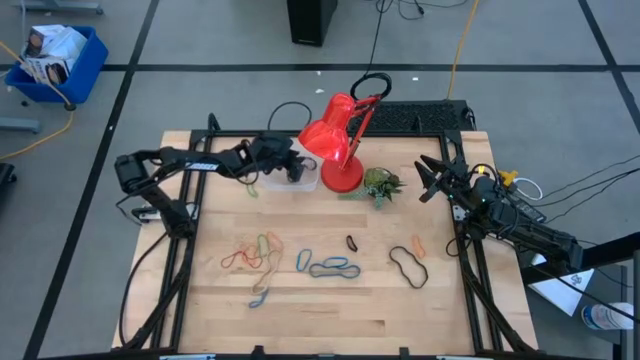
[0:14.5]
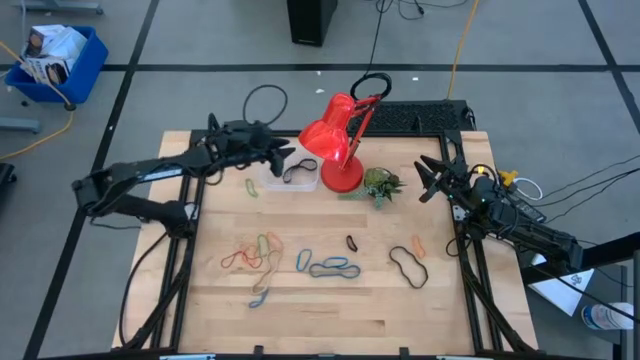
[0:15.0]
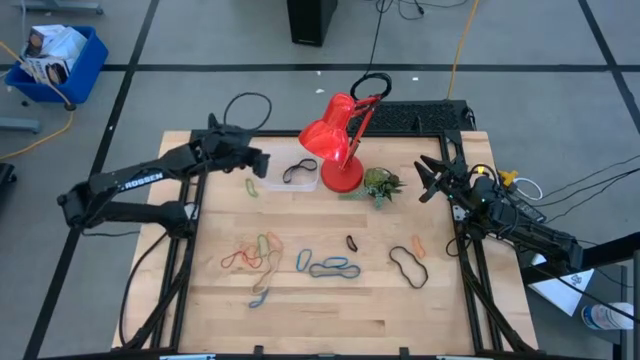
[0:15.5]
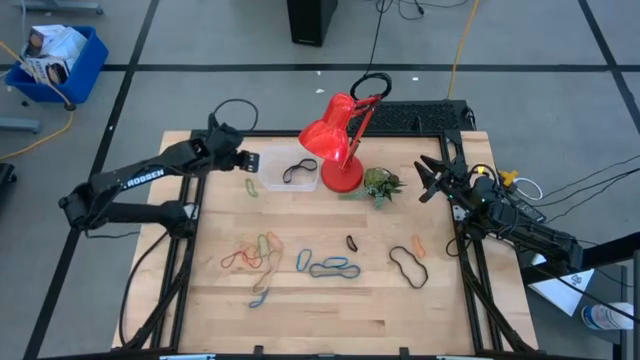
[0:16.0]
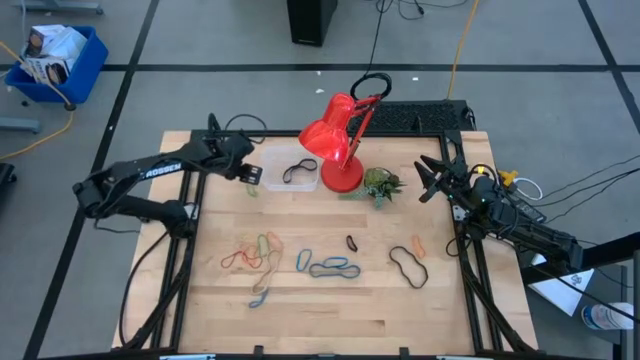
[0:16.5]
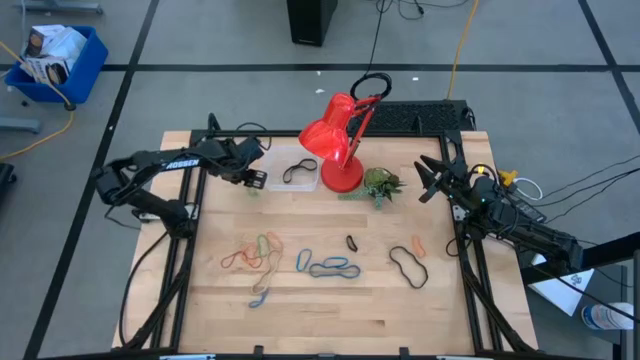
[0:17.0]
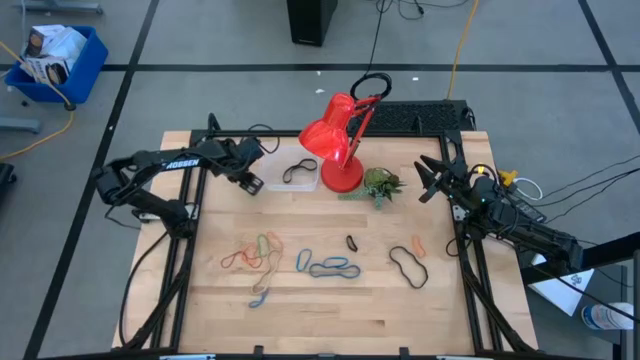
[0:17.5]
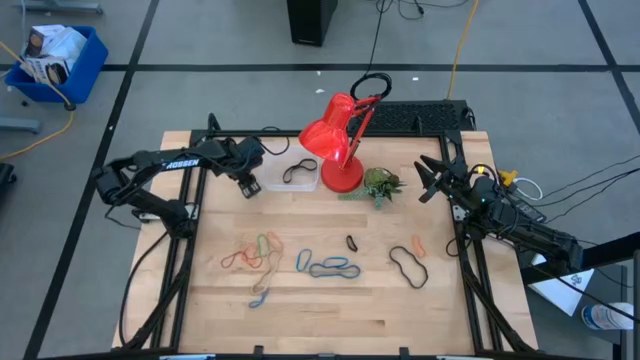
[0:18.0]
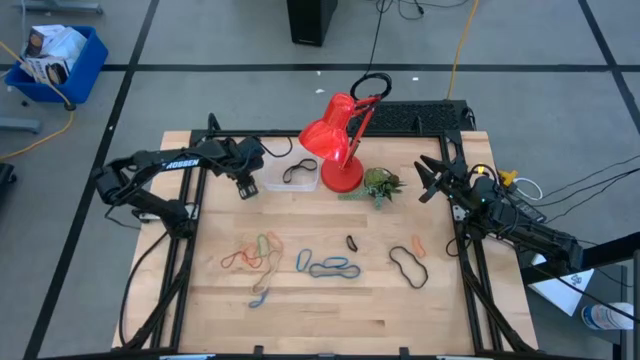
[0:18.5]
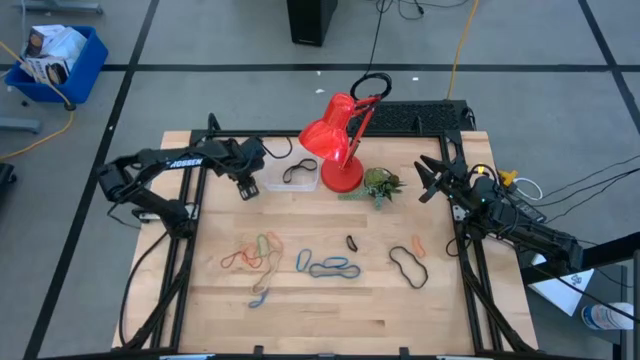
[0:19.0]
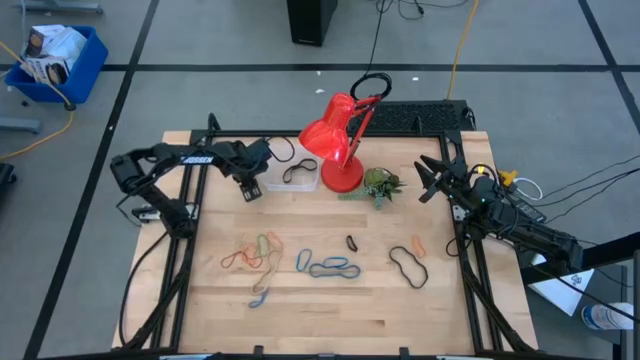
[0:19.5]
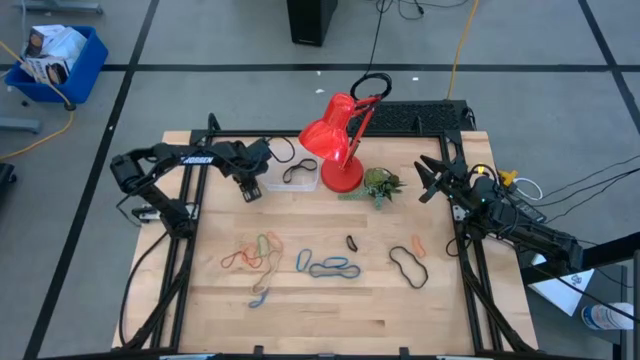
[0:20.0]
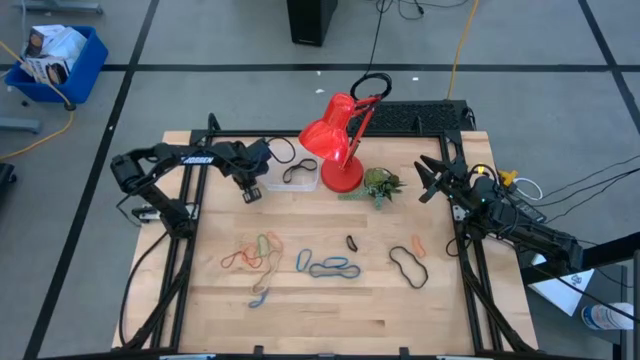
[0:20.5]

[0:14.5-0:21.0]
Task: Pick and place rubber bands into bin
Put the top green rubber band into the transparent bin

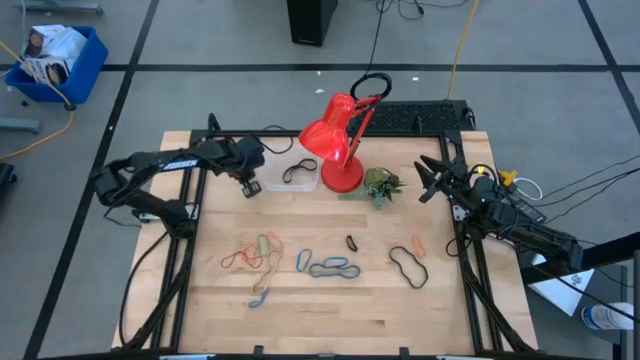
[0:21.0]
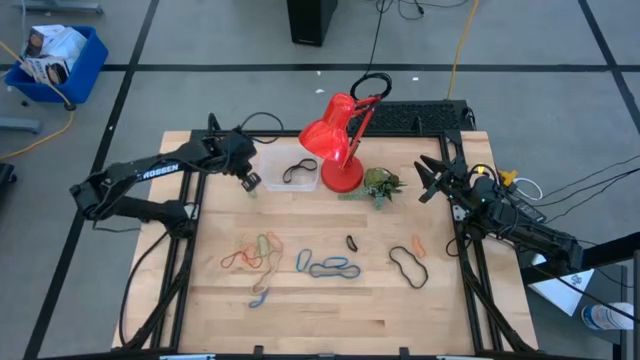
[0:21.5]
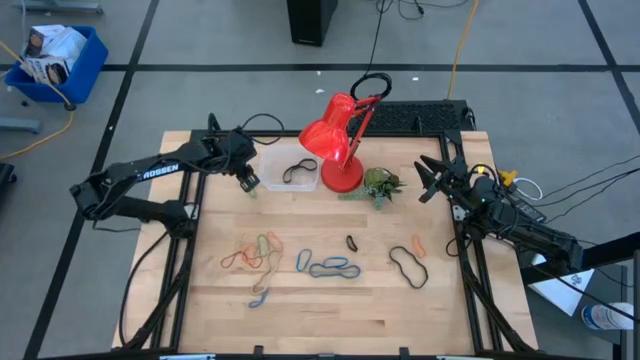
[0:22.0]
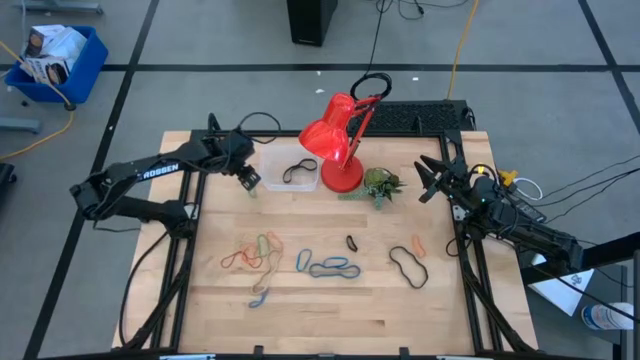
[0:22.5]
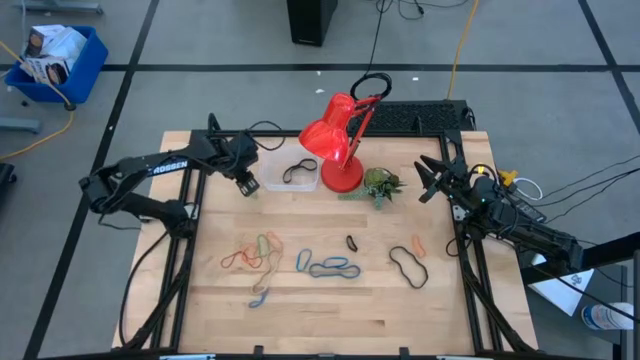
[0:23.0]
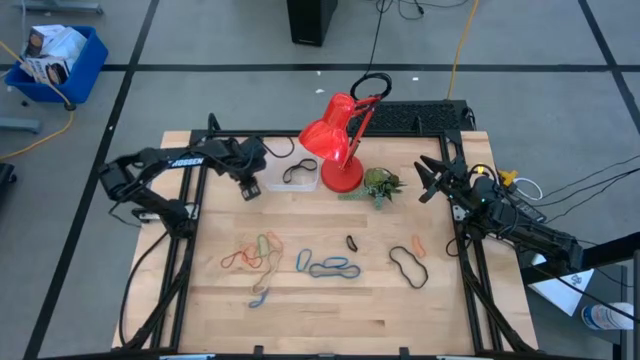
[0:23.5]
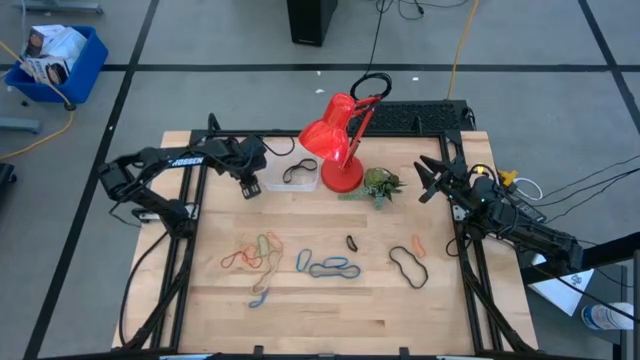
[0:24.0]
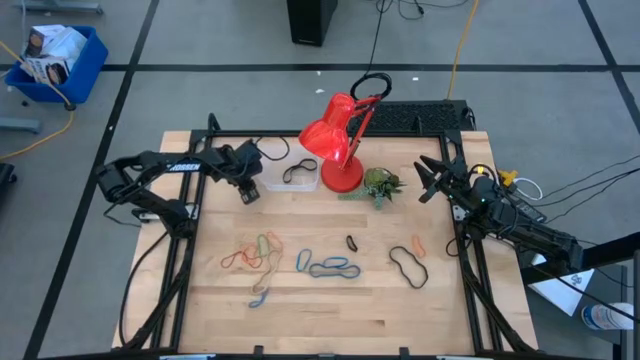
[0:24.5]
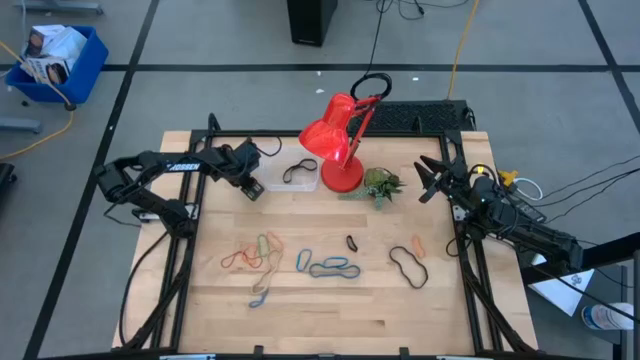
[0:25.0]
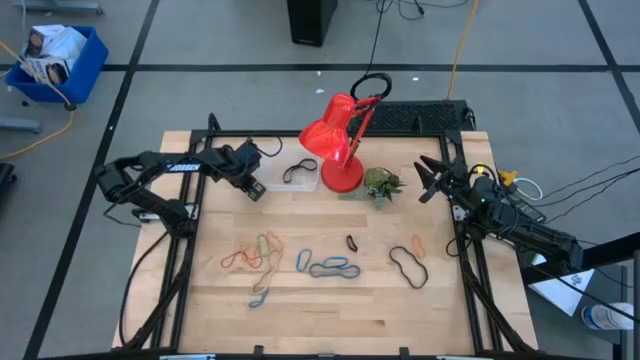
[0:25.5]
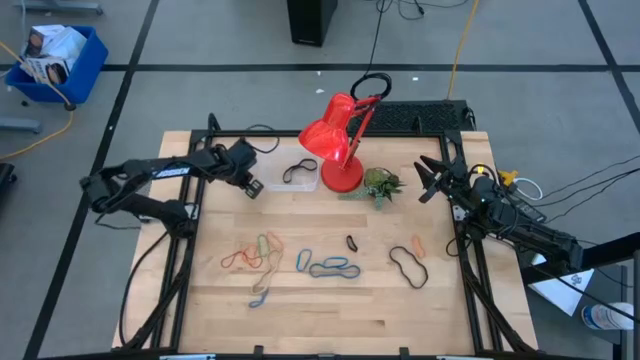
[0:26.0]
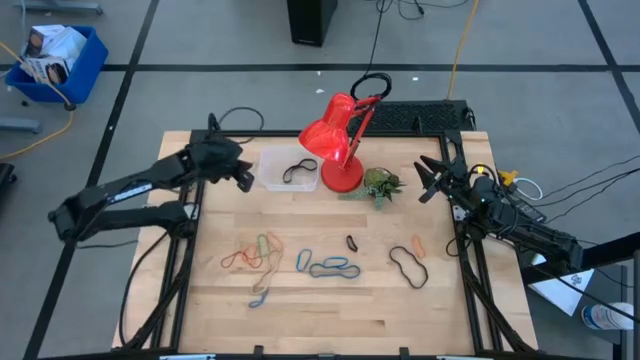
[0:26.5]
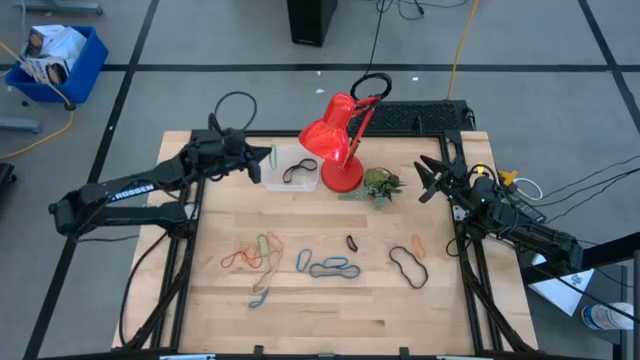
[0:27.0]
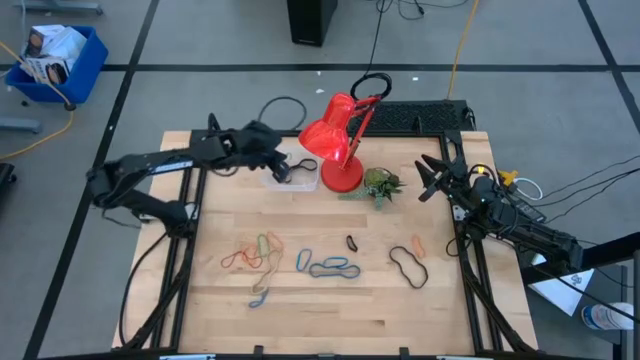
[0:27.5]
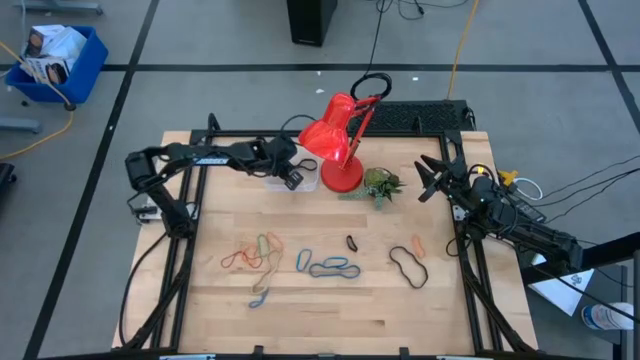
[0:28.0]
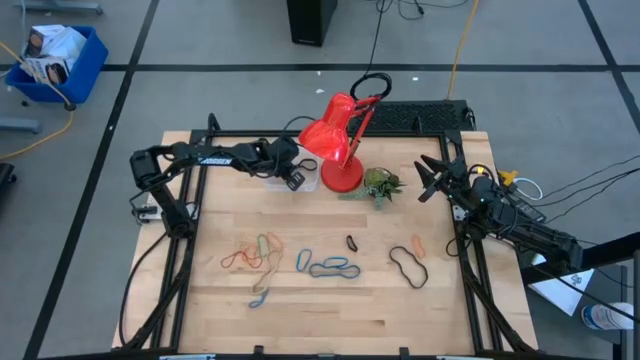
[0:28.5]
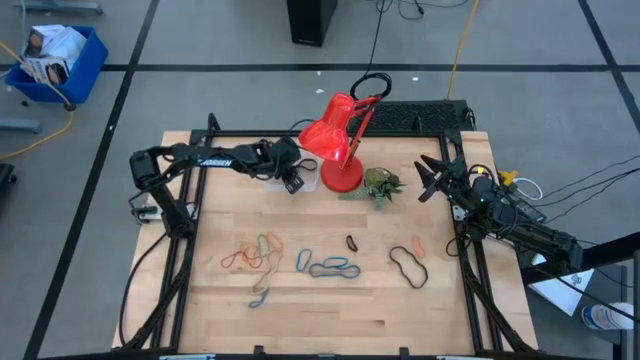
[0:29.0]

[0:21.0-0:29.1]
Put the top green rubber band into the transparent bin

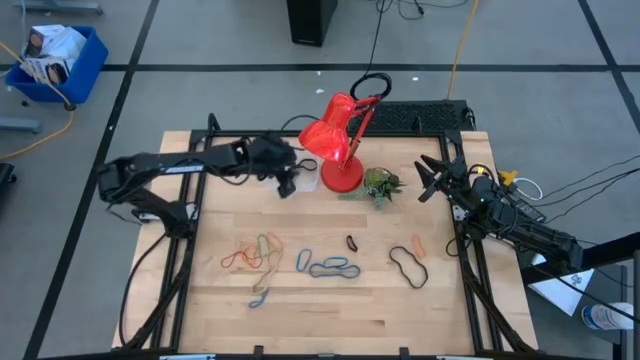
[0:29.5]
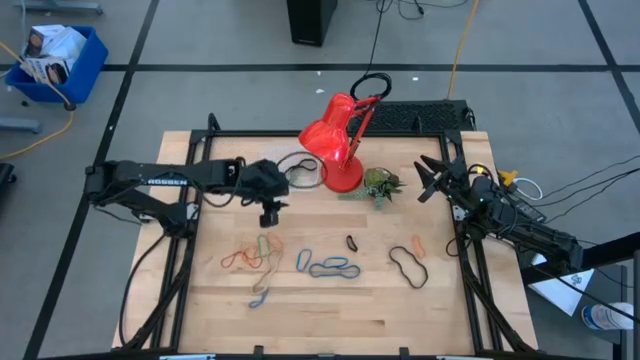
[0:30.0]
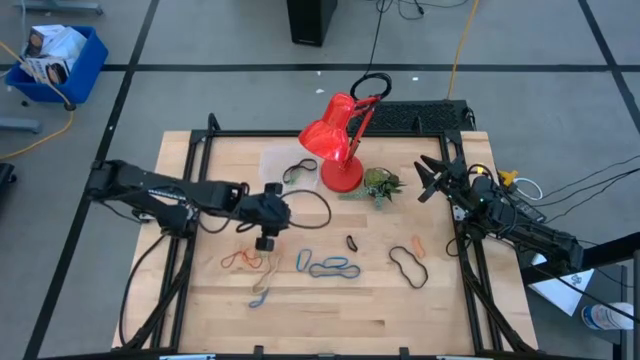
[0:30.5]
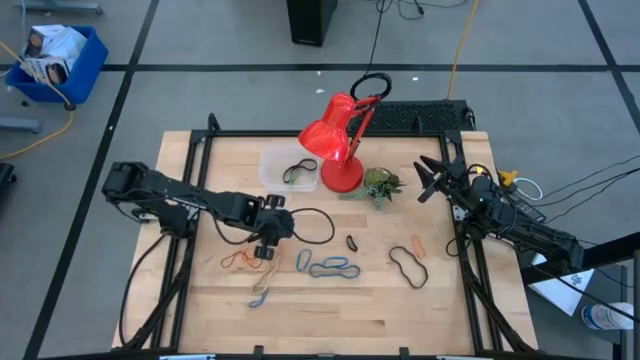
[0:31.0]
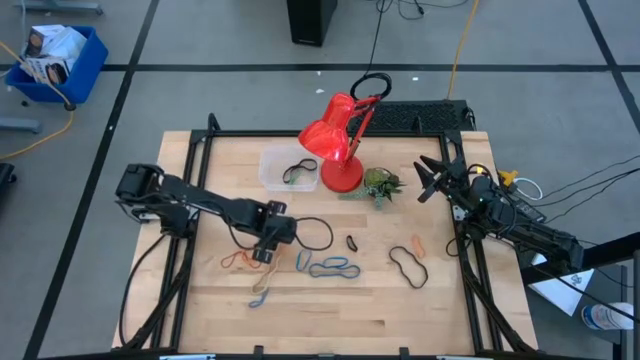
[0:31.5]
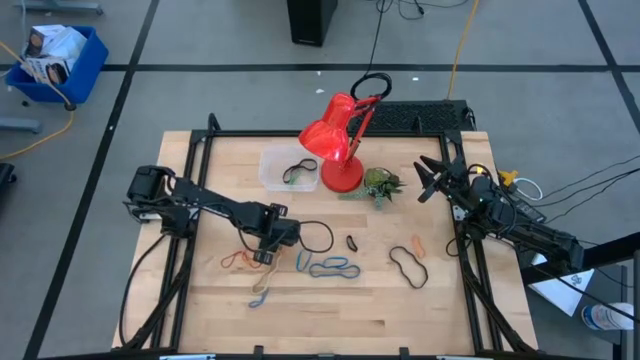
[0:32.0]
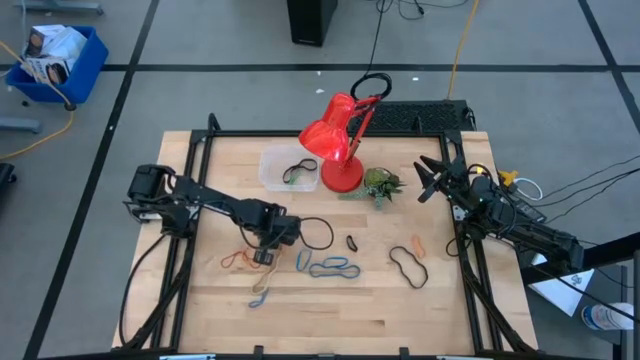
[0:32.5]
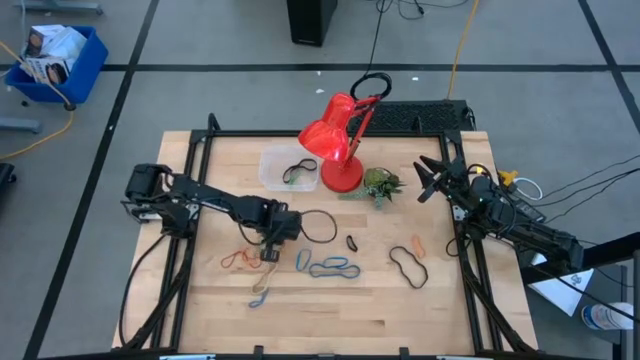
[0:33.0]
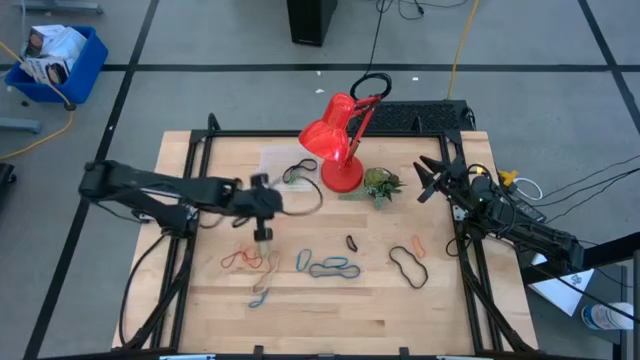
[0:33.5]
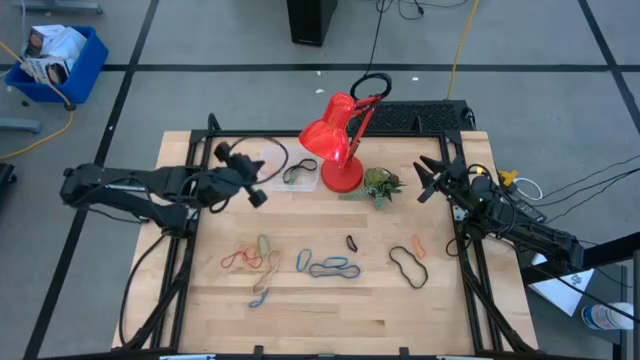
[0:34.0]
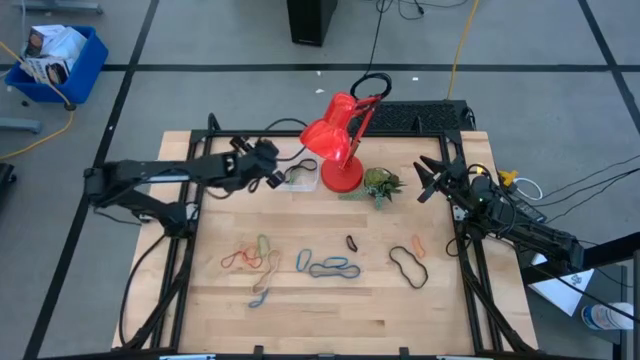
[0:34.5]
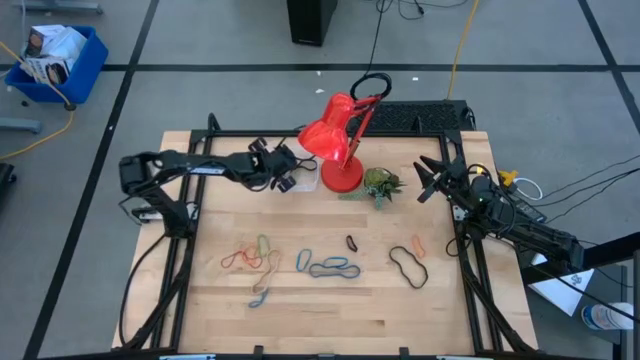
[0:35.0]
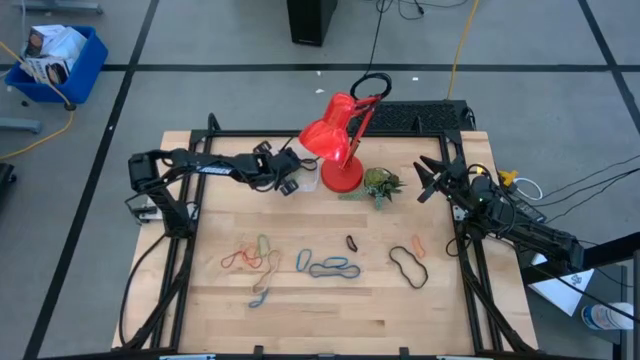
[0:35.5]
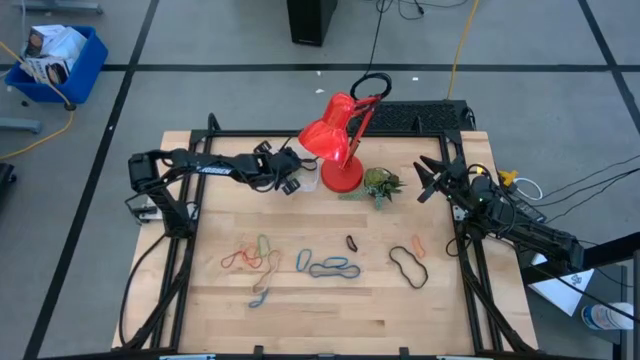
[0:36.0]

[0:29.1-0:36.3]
Put the middle orange rubber band into the transparent bin

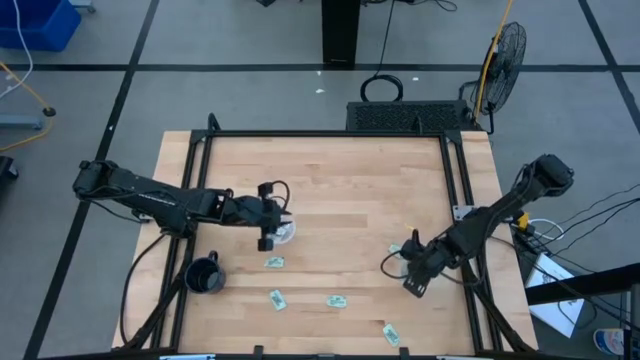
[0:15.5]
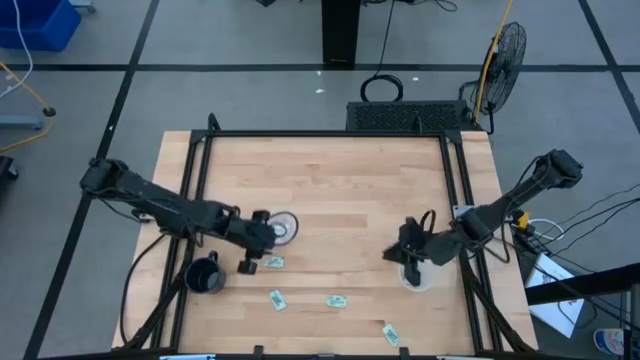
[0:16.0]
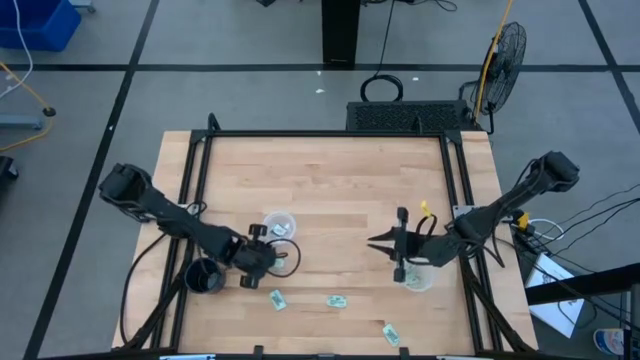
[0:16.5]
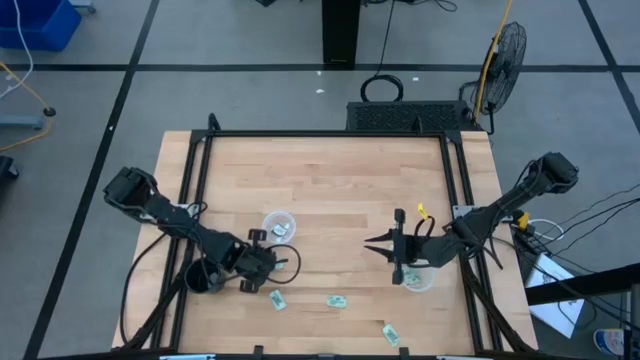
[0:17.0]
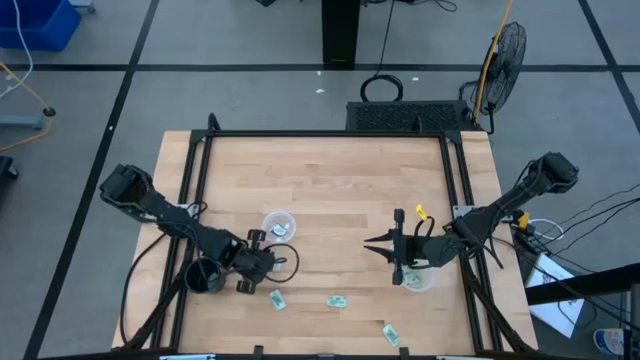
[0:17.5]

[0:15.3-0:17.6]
Task: Pick and place Stevia / Truvia into bins
Put the green stevia packet into the left transparent container
